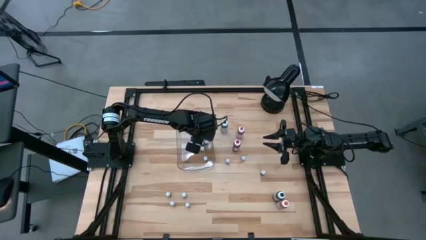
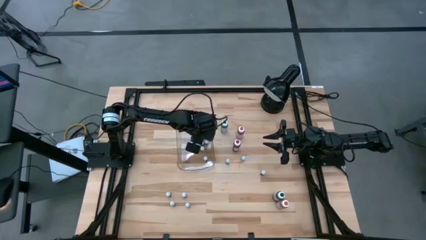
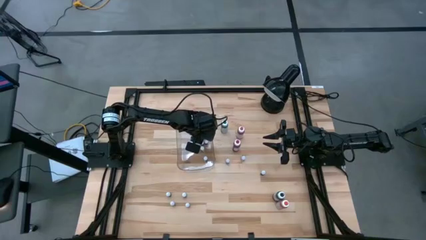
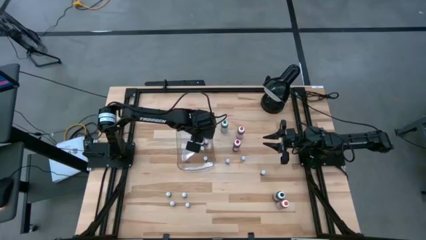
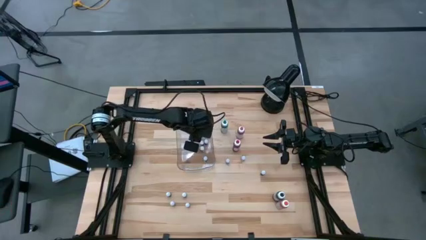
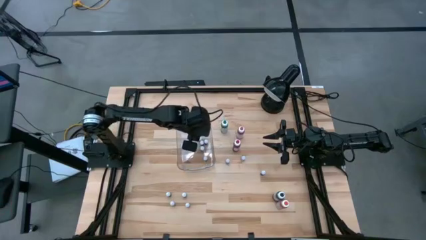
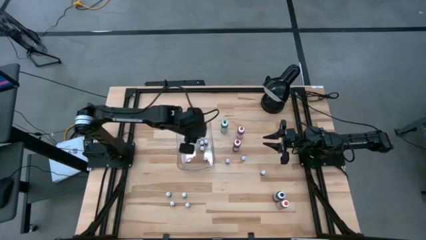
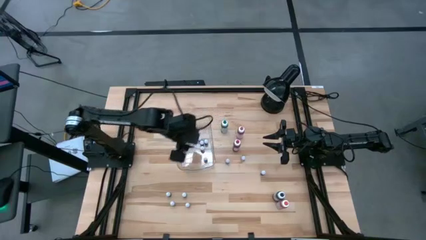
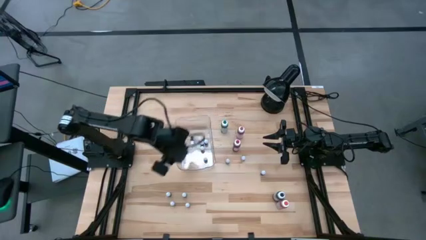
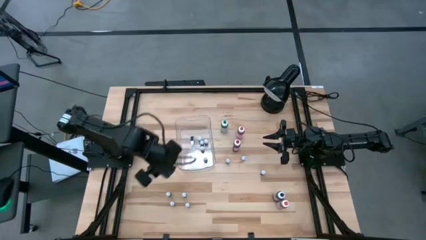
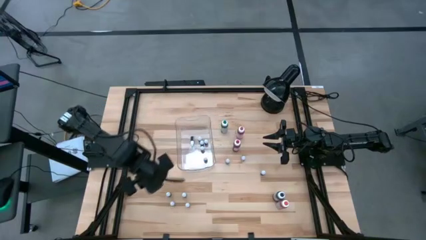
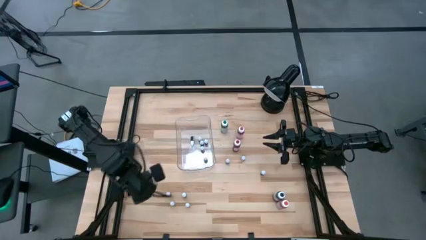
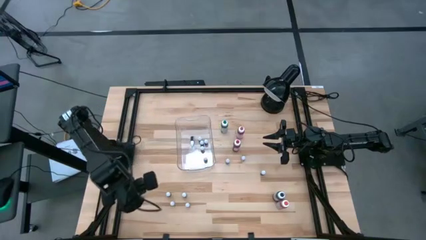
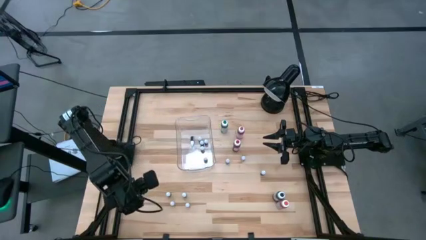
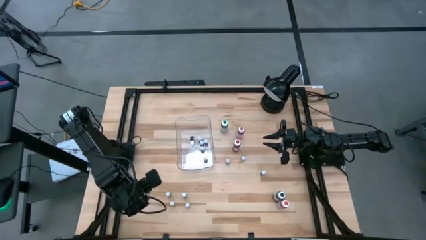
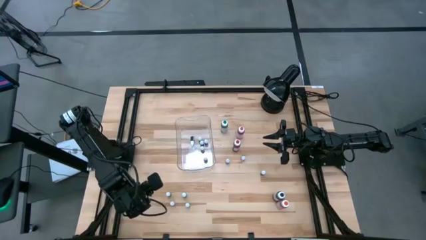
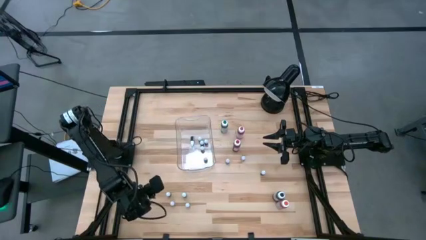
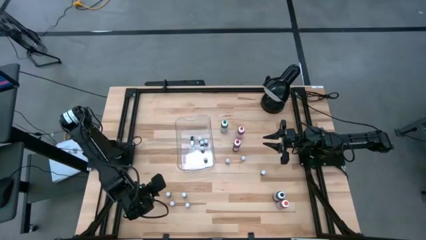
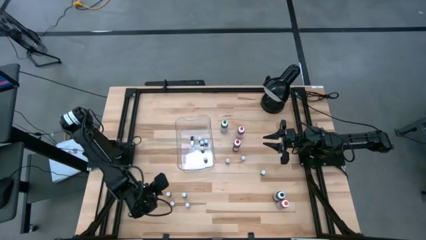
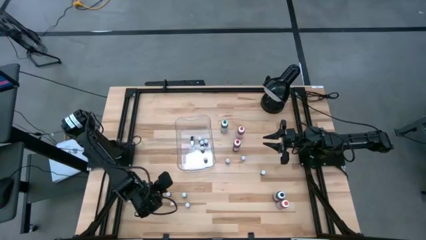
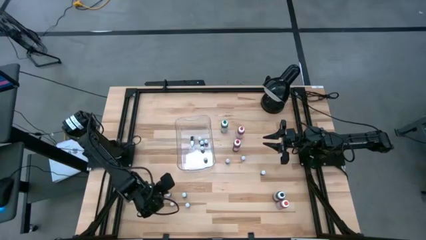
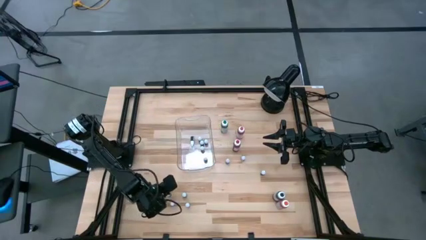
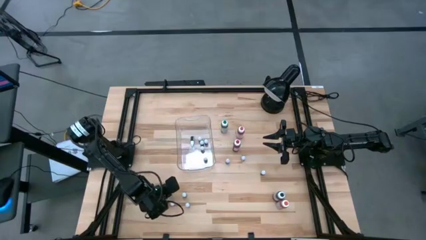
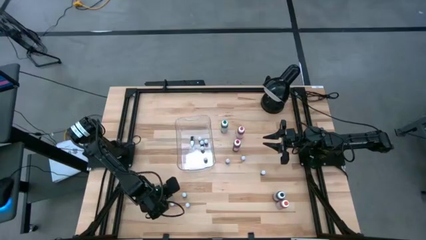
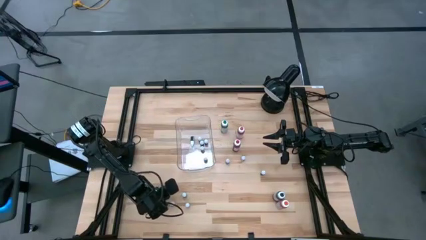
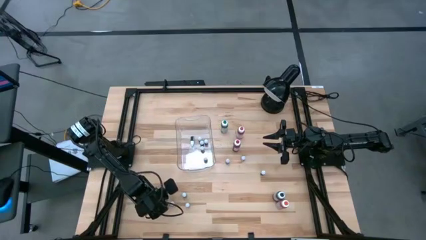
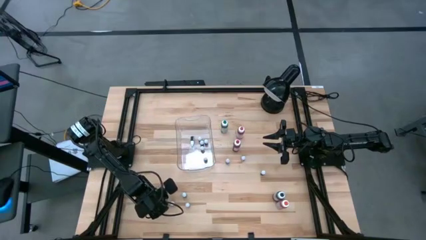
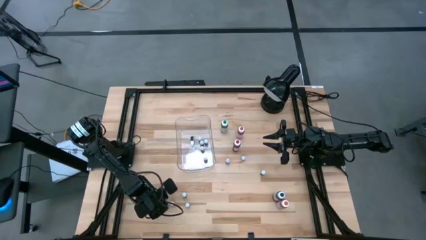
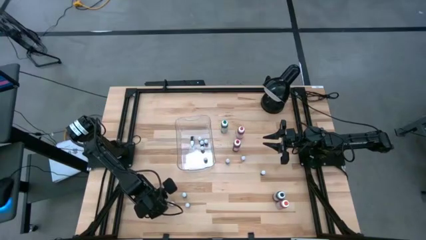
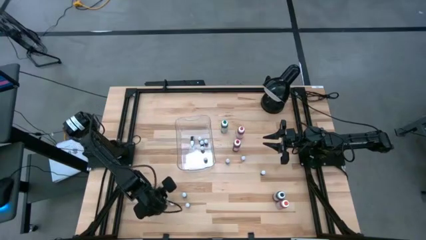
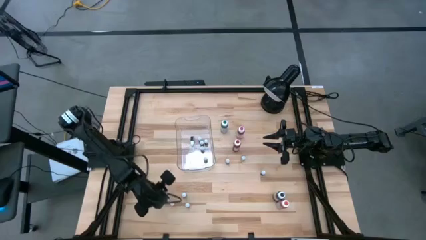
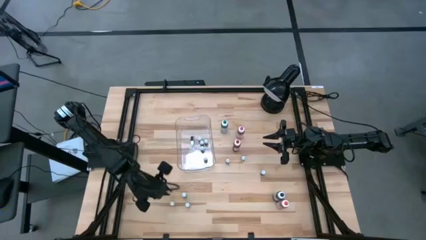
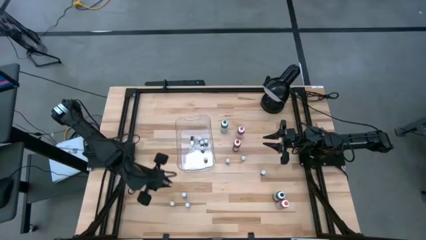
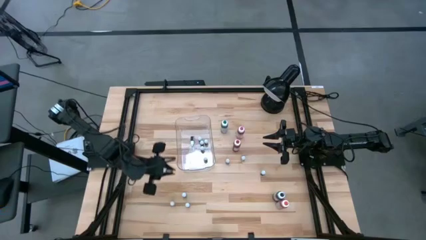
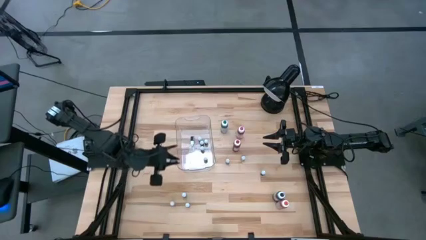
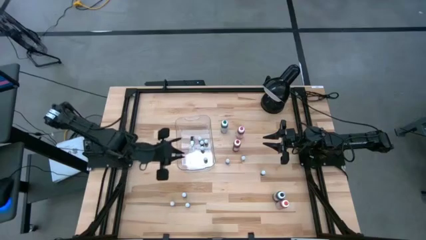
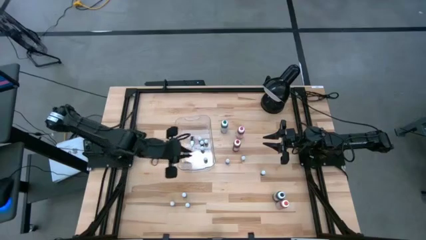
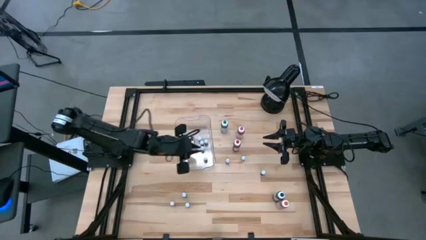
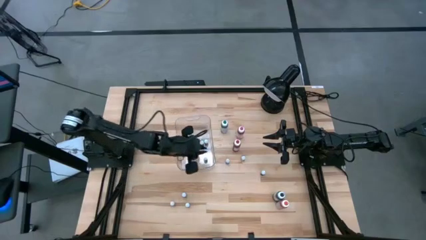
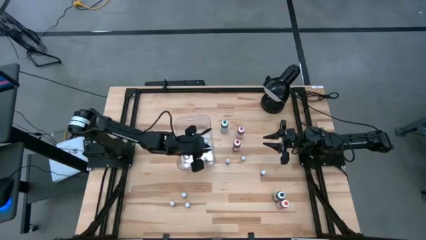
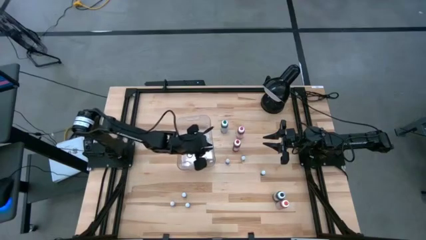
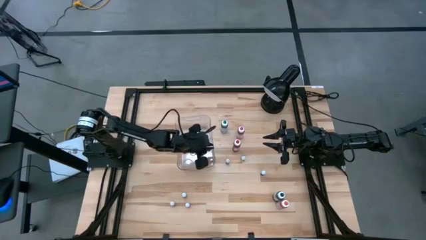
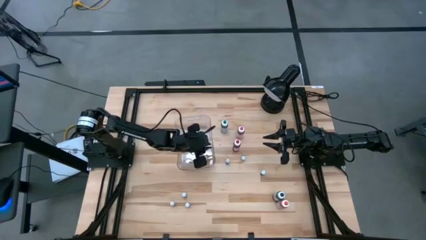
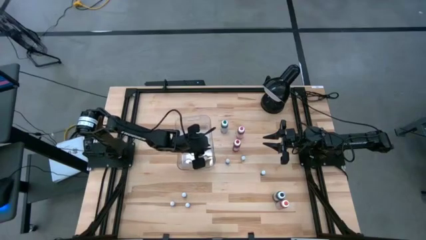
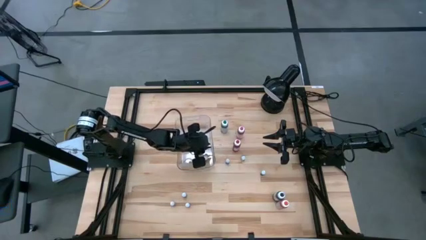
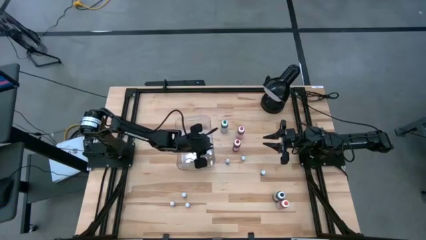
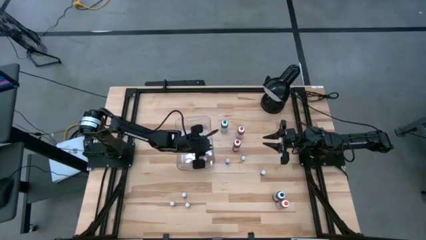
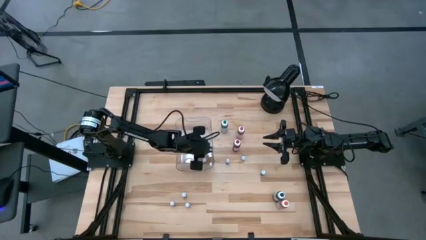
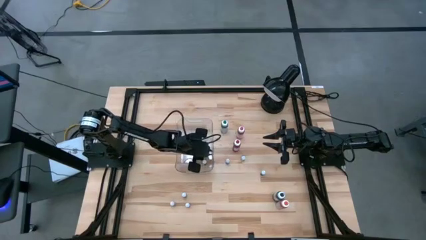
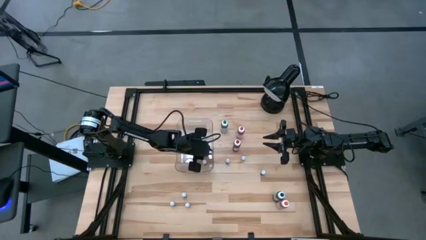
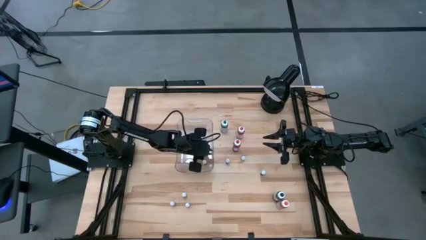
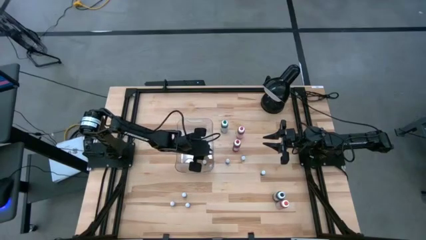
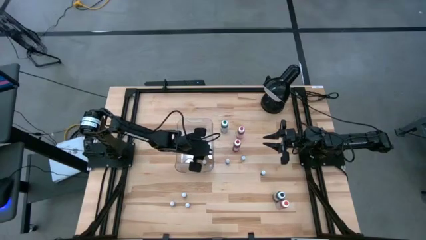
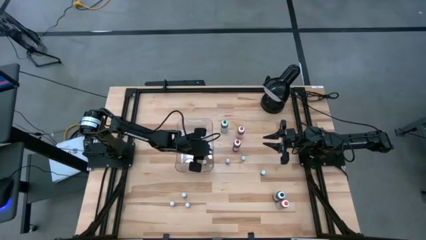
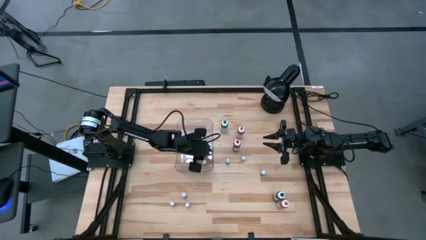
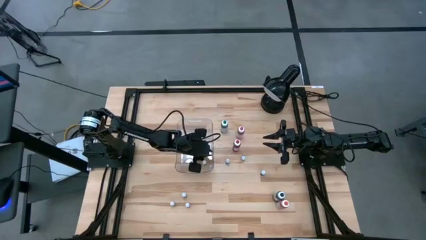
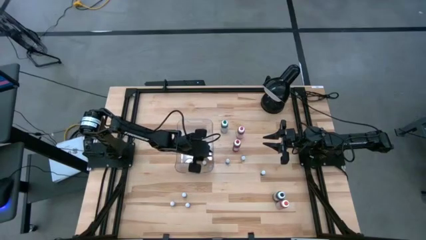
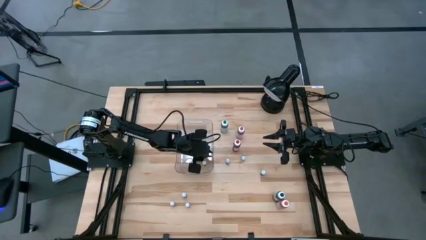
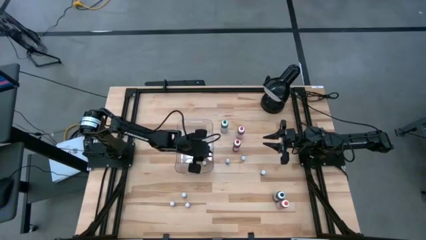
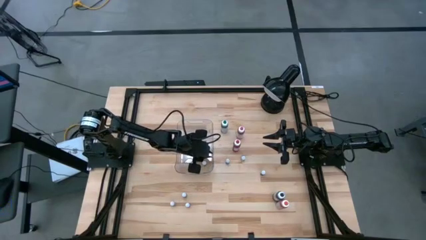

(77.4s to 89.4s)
Task: Pick & Place food coloring
Put the small brown food coloring bottle into the transparent bin

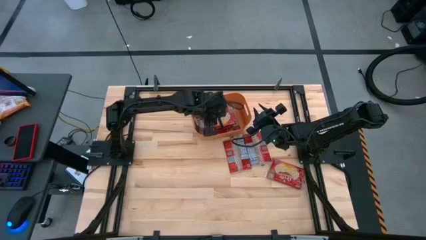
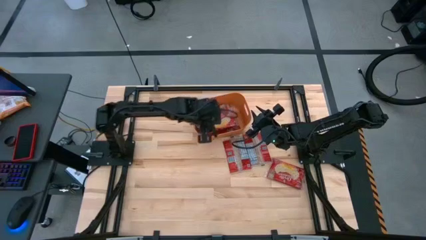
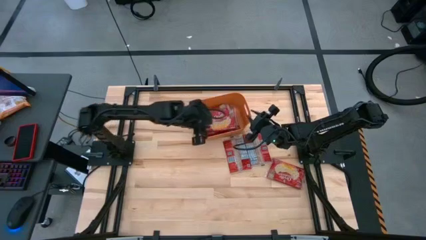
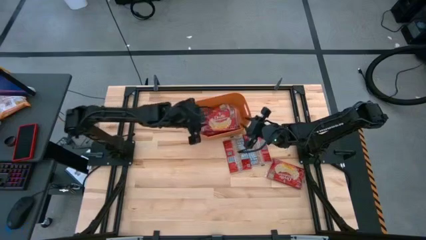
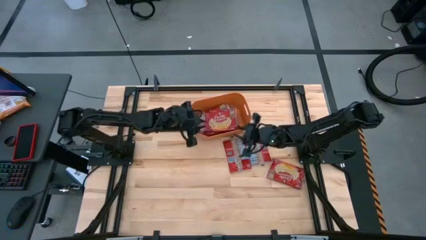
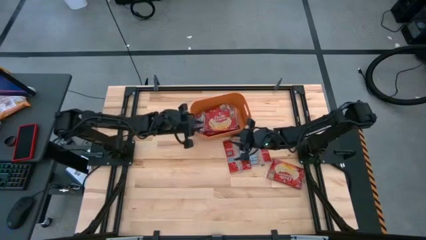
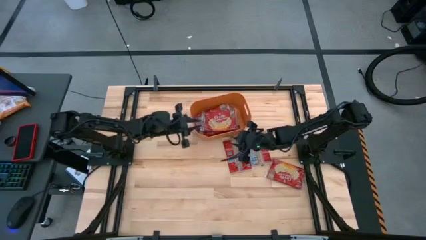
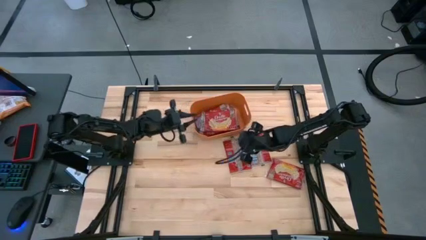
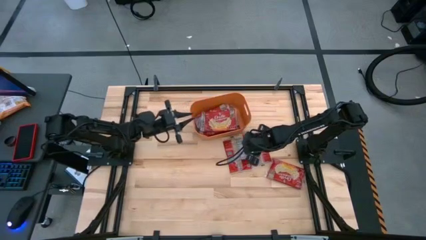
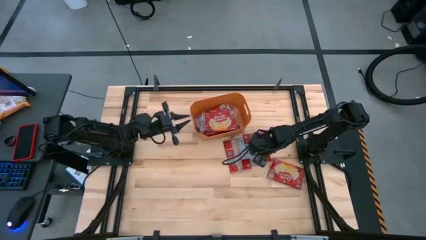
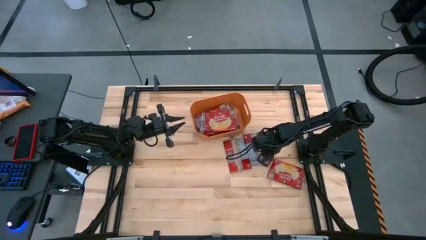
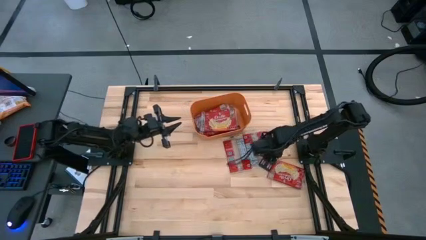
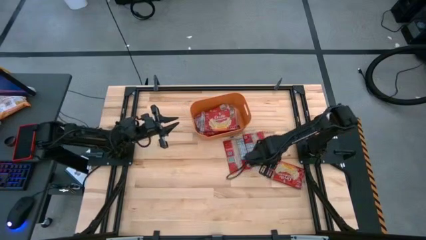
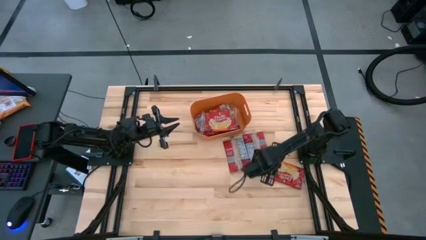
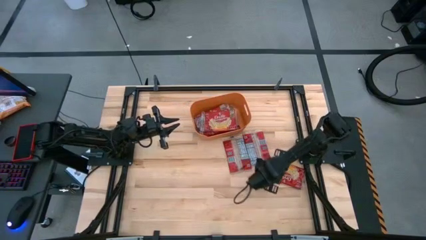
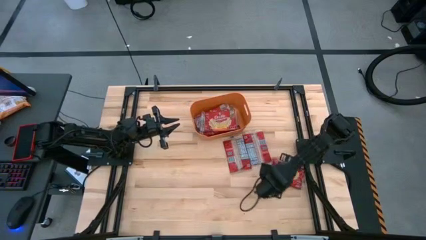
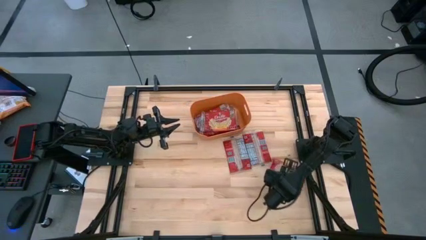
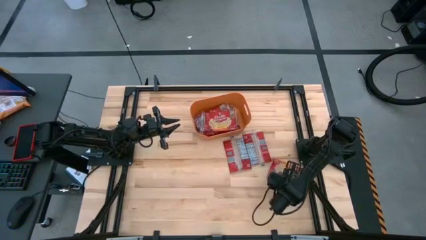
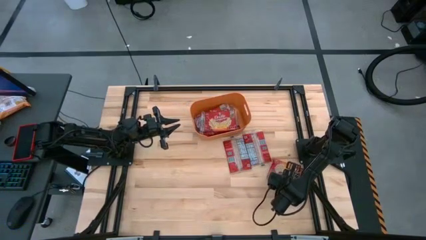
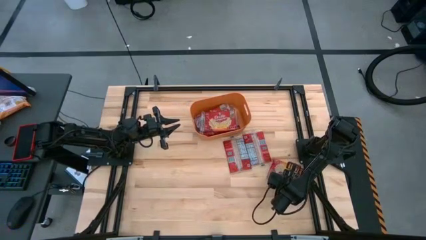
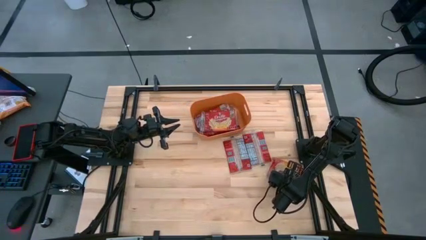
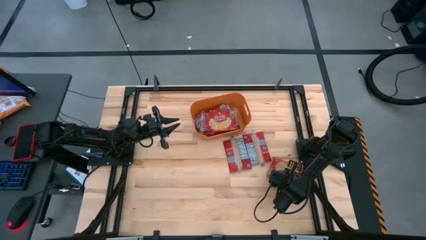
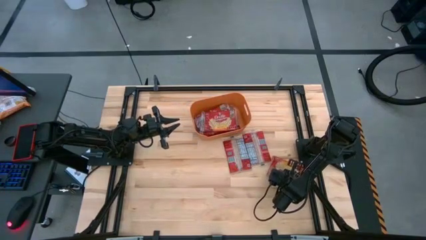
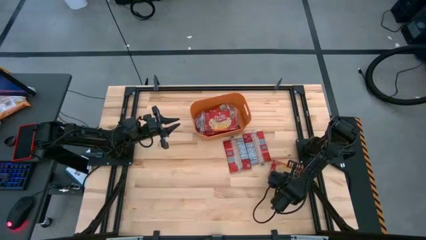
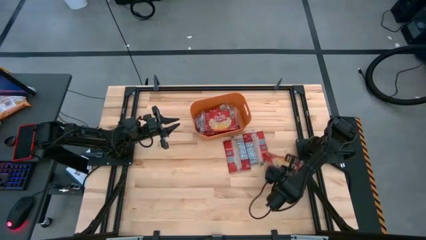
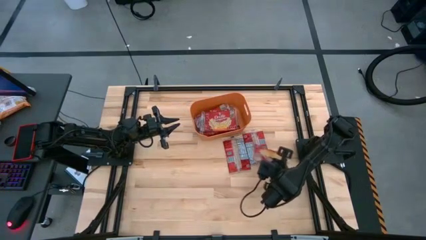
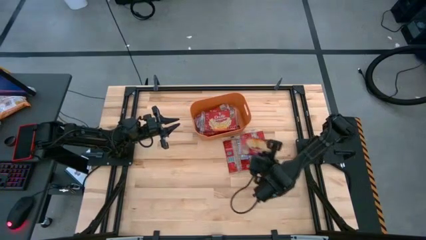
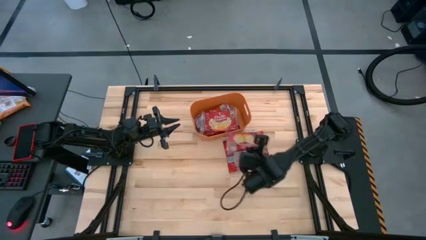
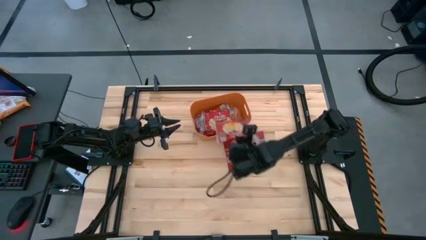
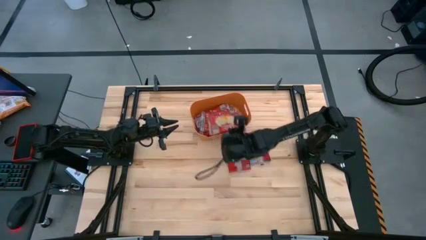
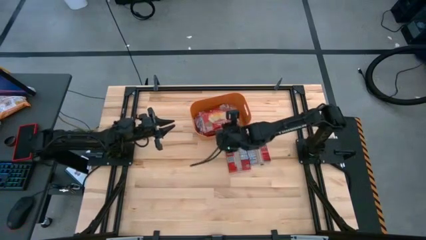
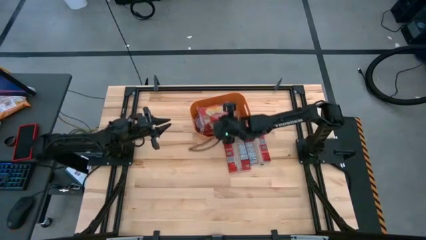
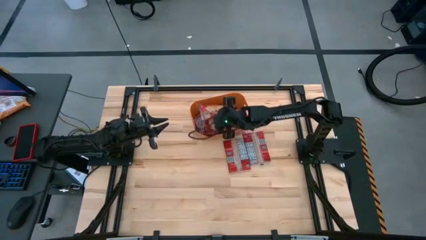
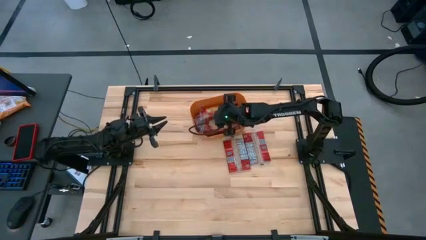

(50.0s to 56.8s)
Task: Sort popcorn bags into baskets
Put the red popcorn bag into the orange bin
